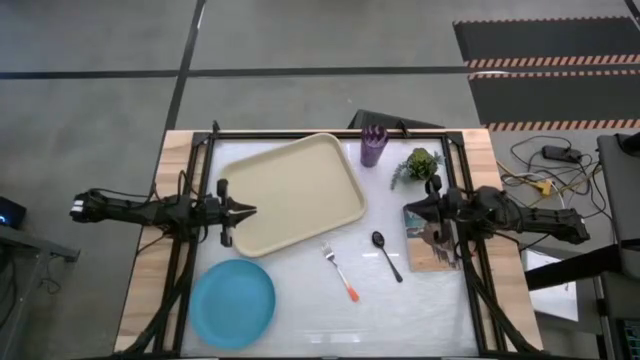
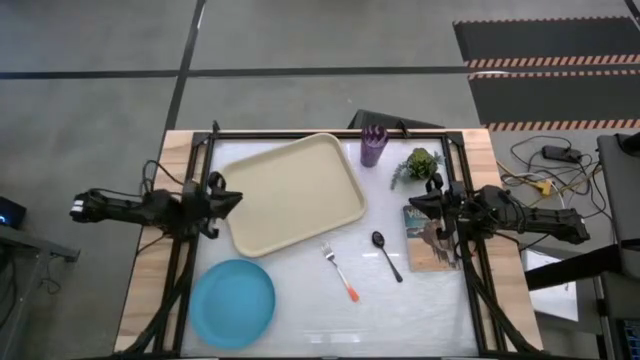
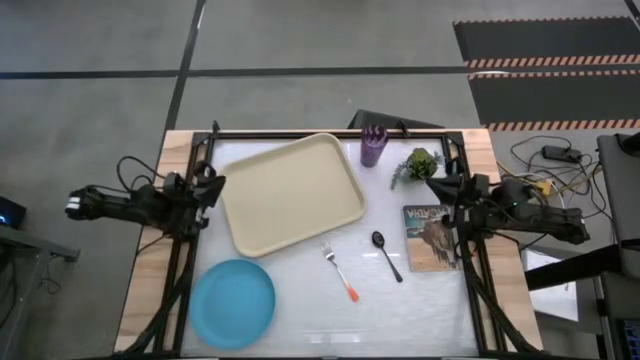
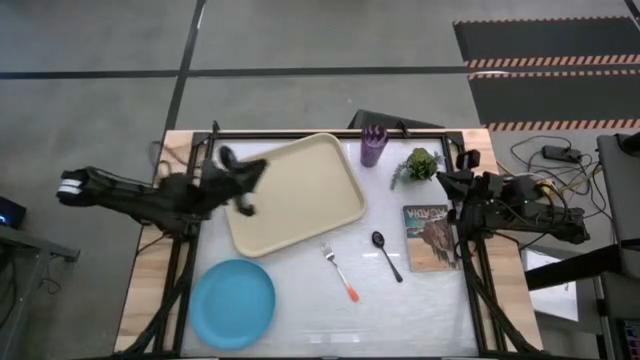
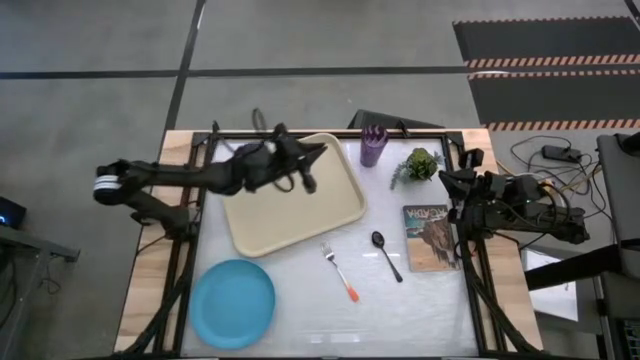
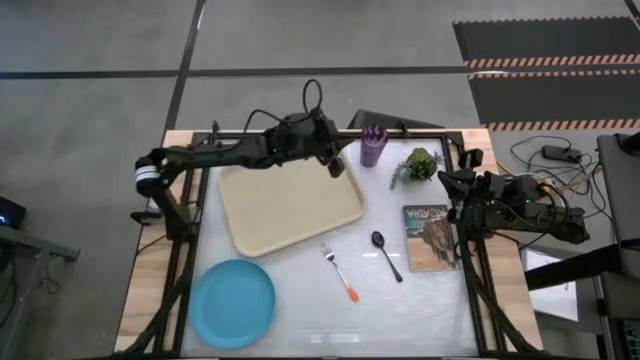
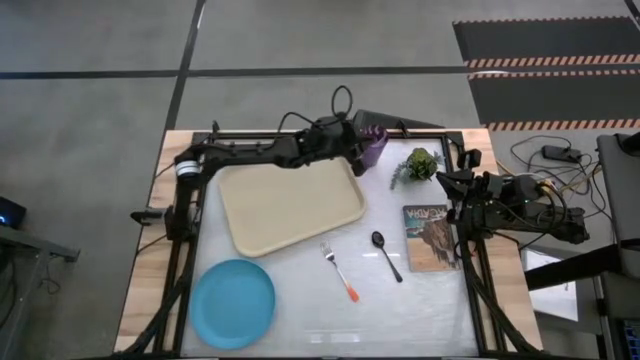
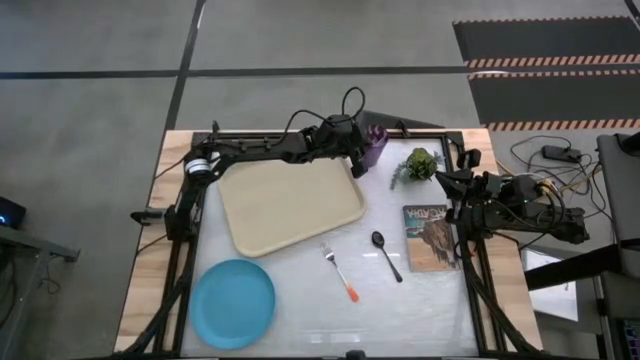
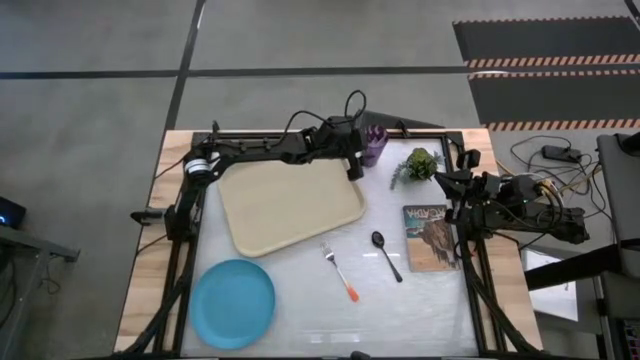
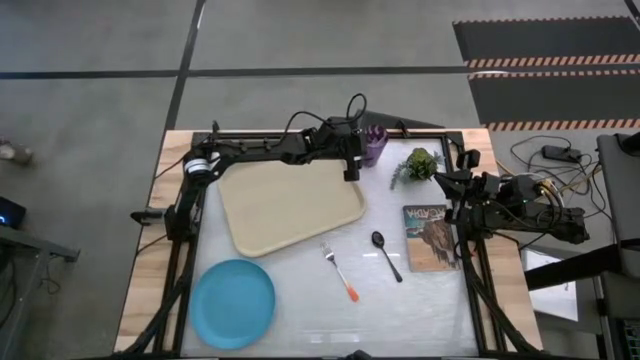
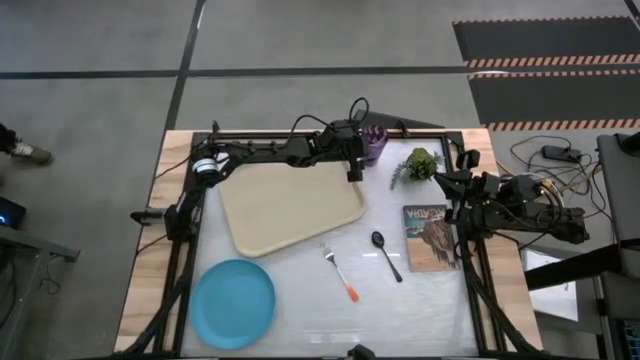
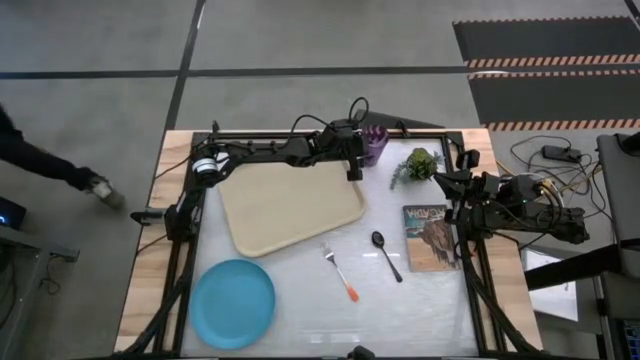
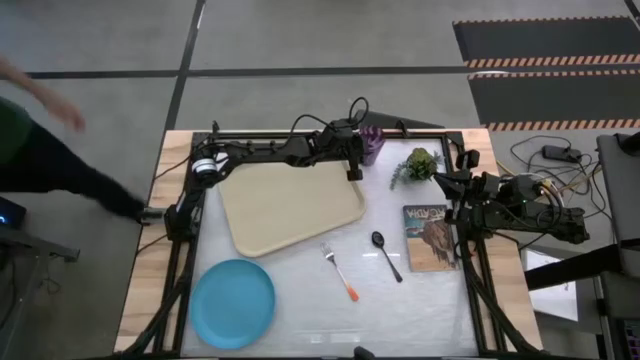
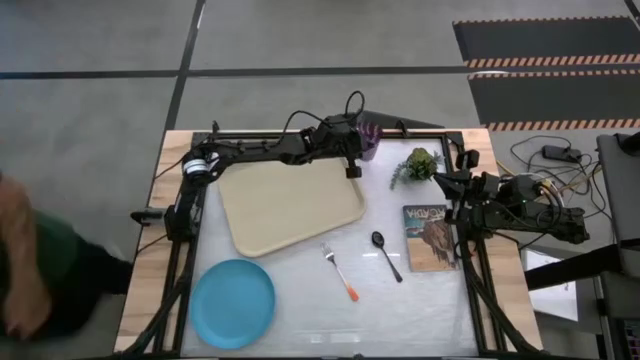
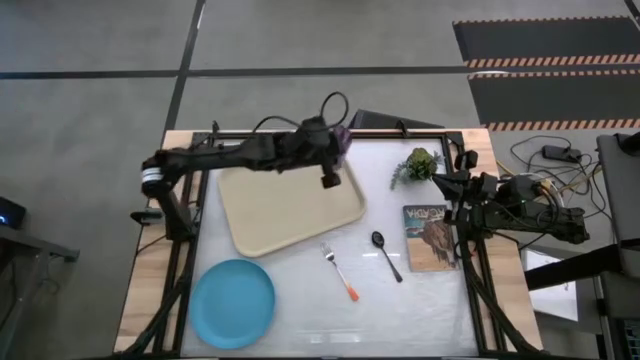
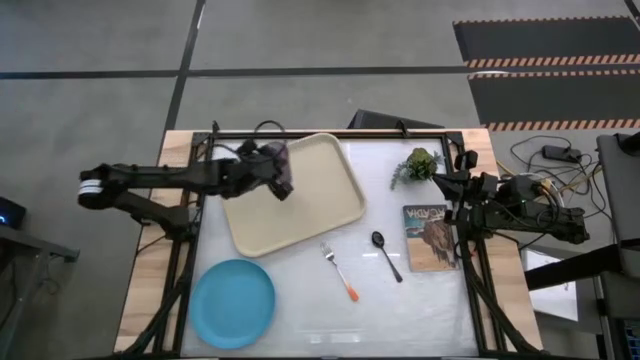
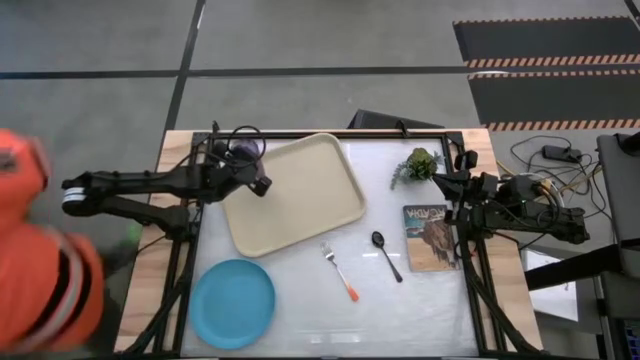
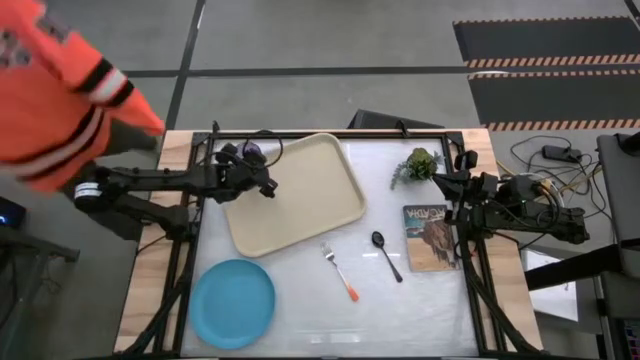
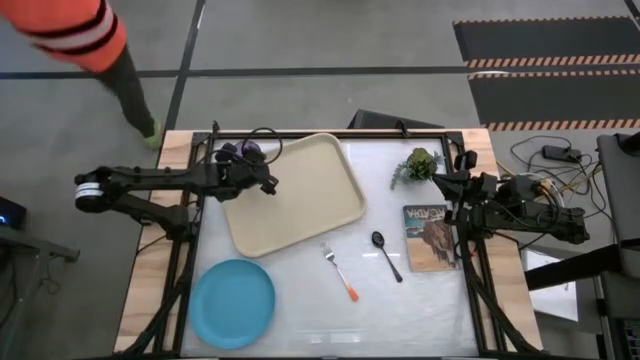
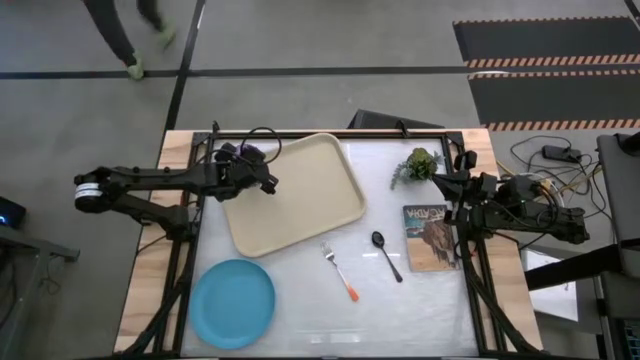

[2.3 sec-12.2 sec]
Task: Pick and place plate/cup/fork/spoon on tray
Put the purple cup on the gray tray

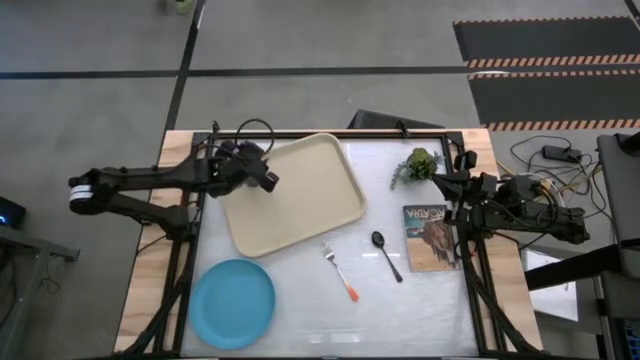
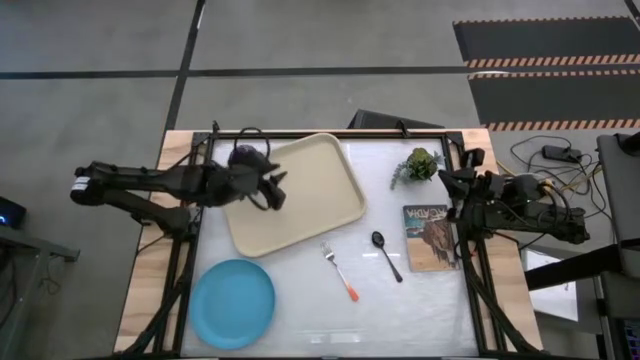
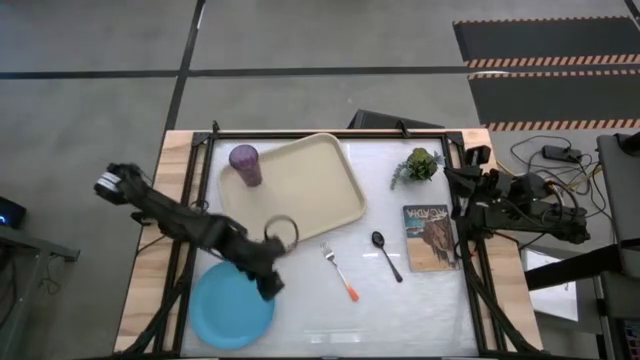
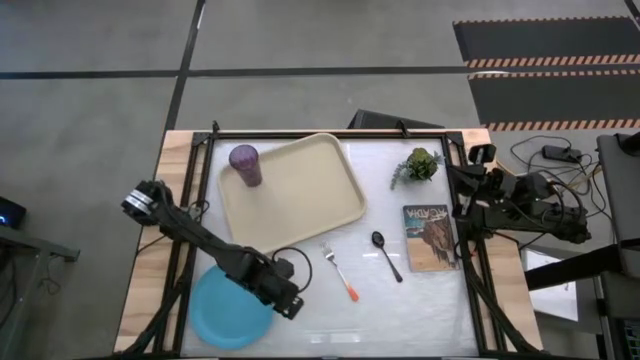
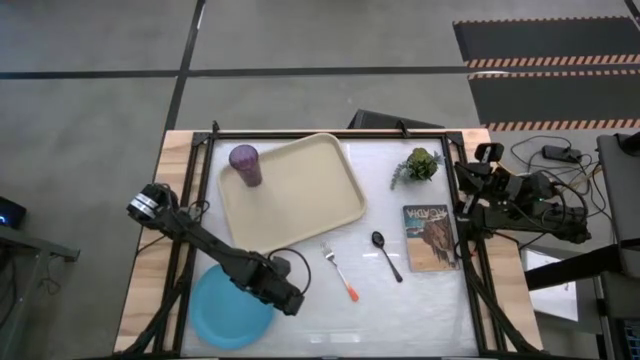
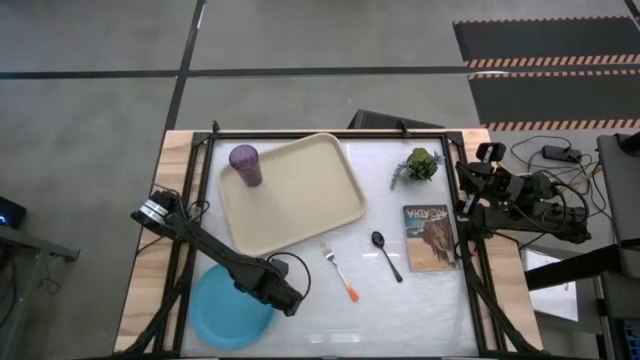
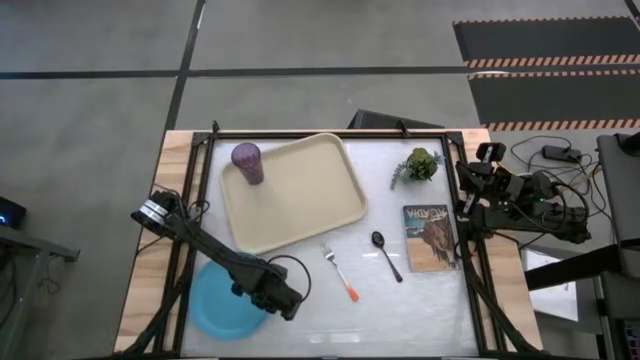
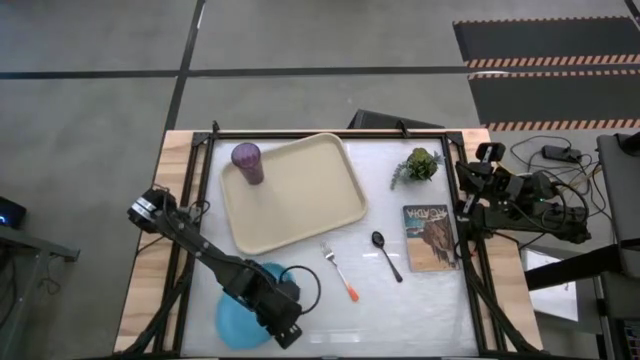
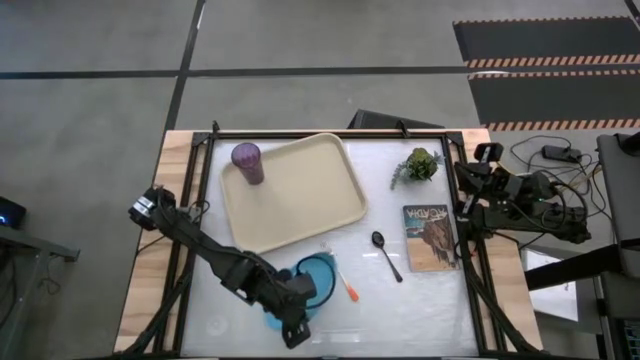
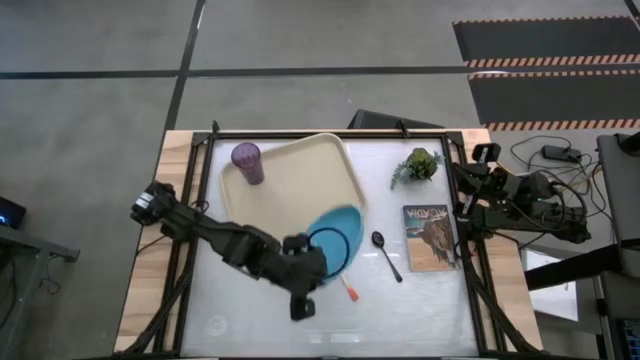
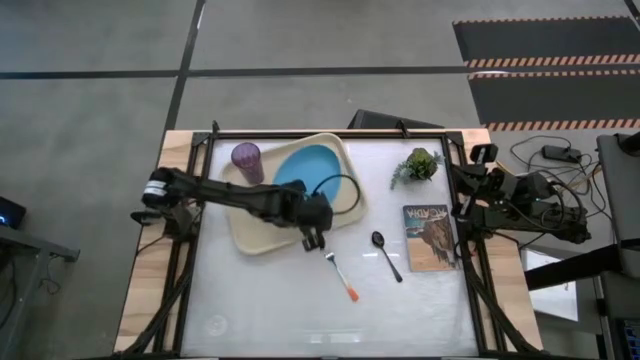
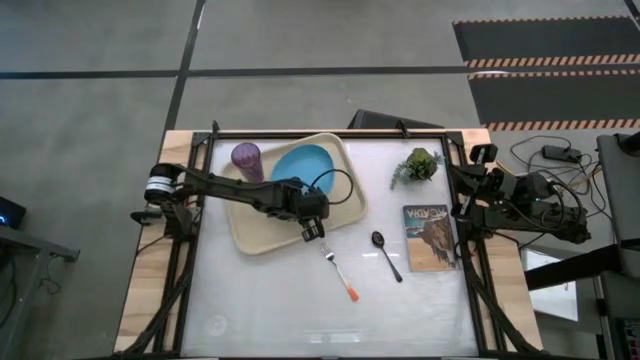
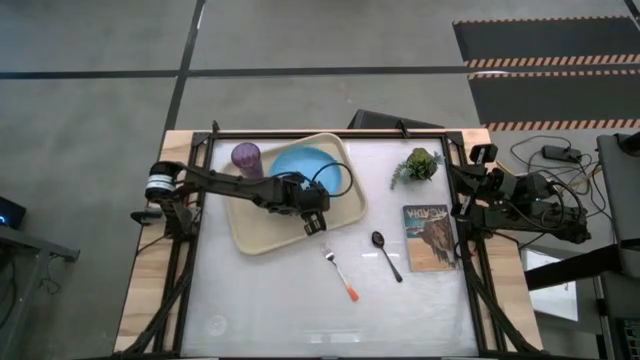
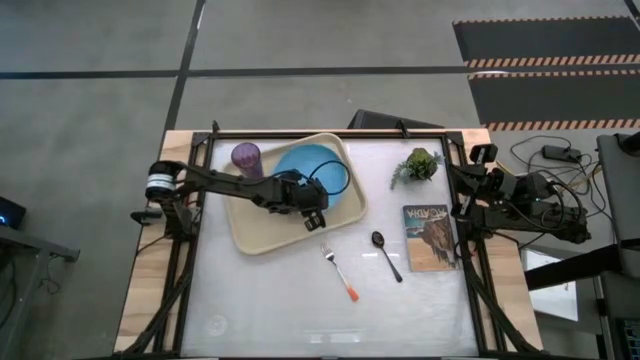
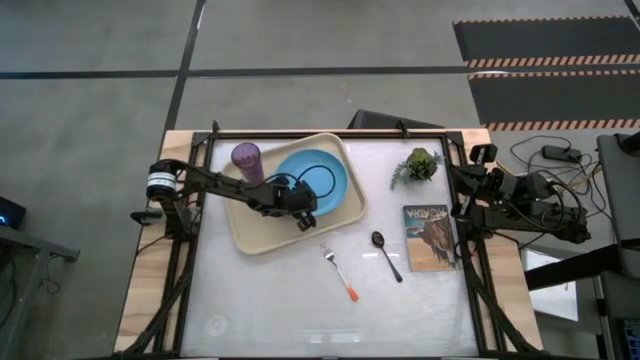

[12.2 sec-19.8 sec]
Put the blue plate on the gray tray to the right of the purple cup

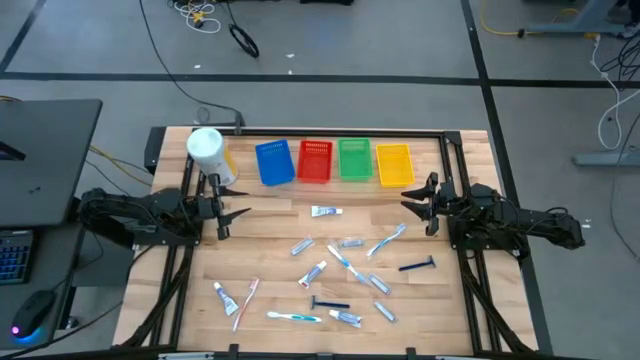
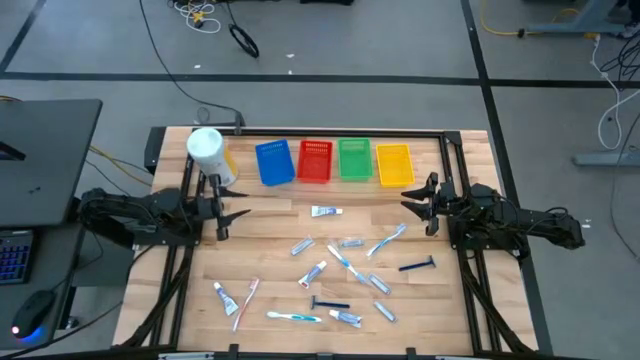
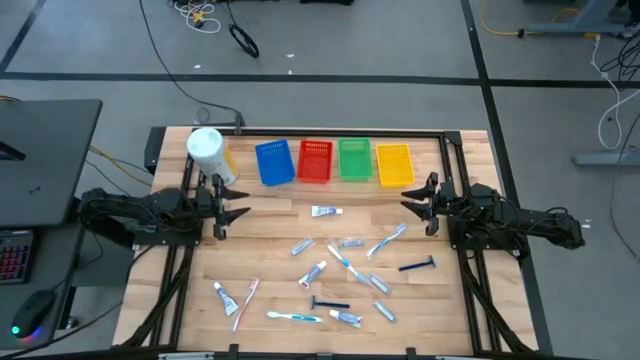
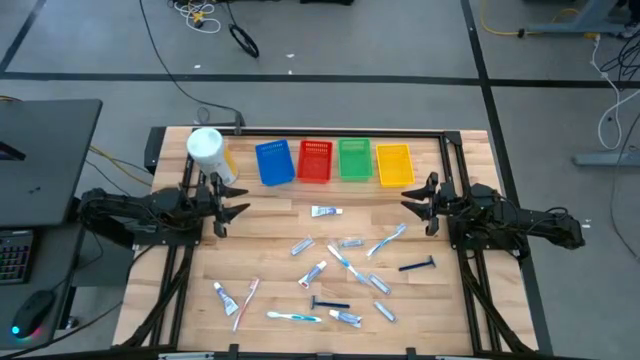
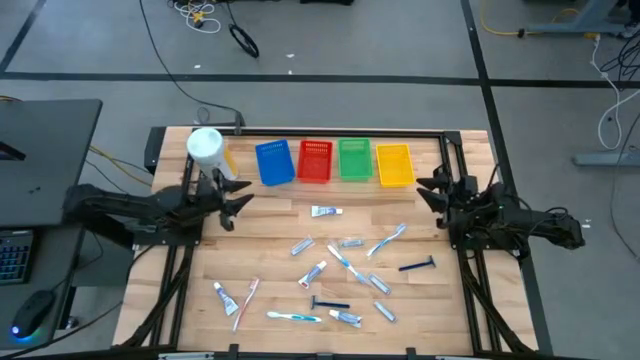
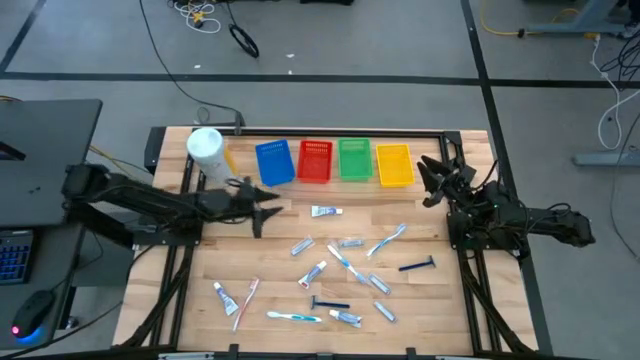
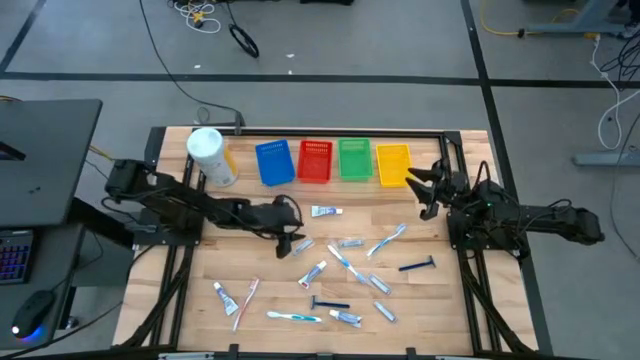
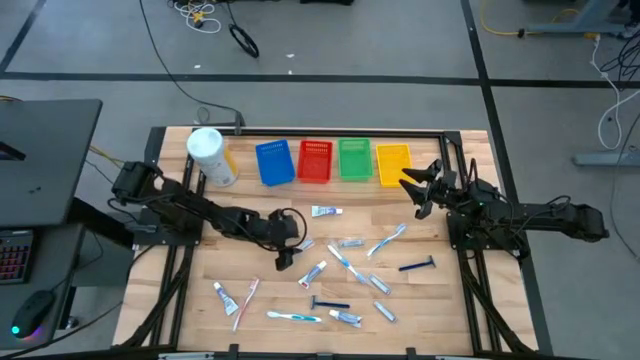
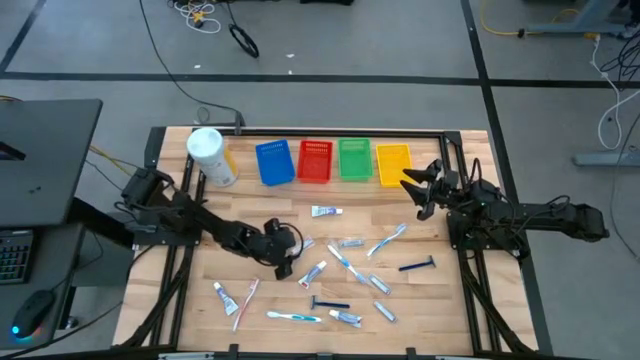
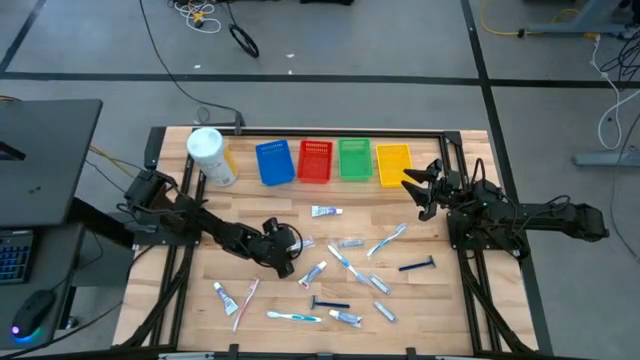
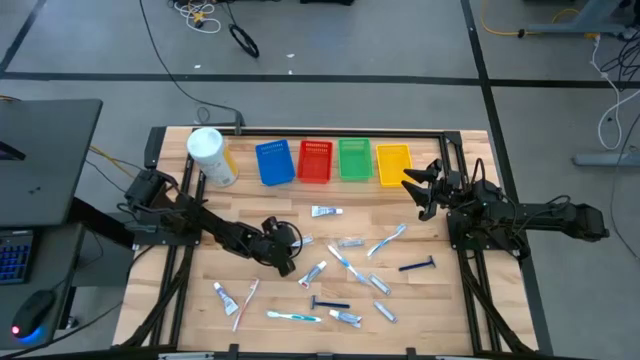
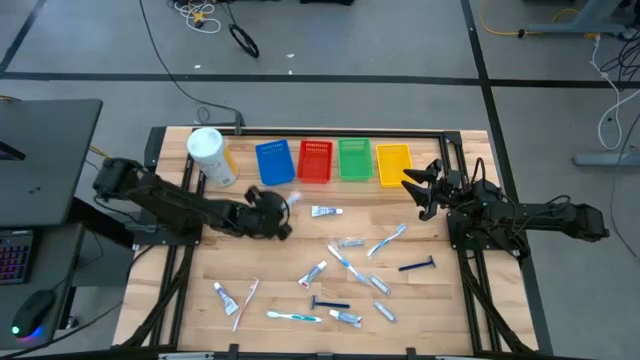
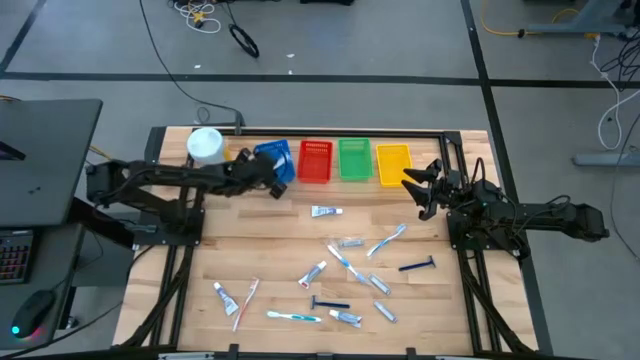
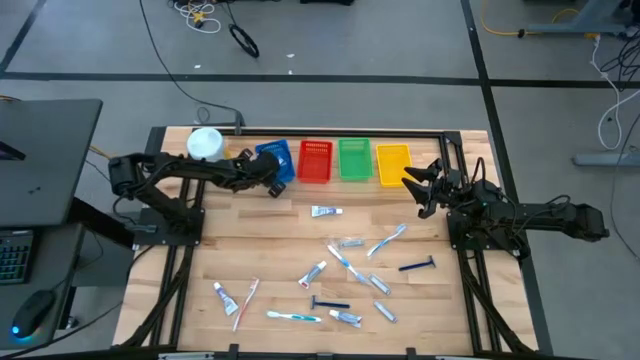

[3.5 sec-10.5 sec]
Task: Pick & Place Travel size toiletries
Put the silver nail cutter into the blue basket
